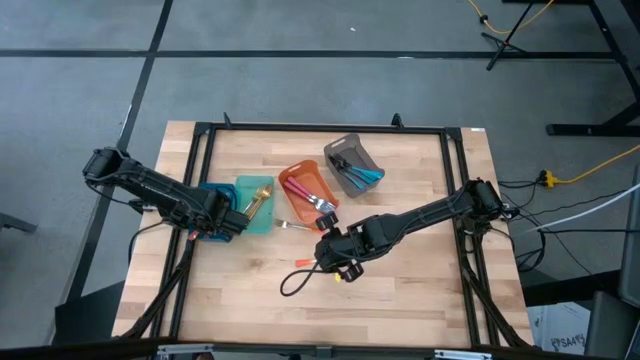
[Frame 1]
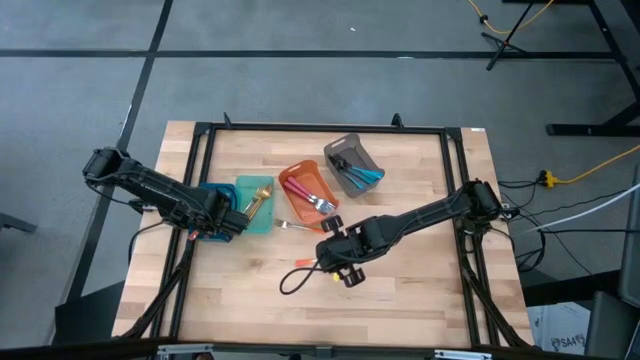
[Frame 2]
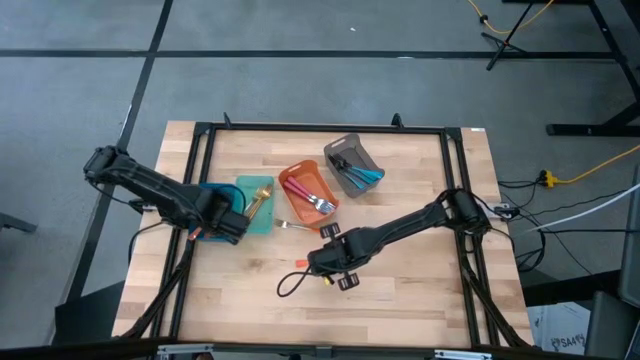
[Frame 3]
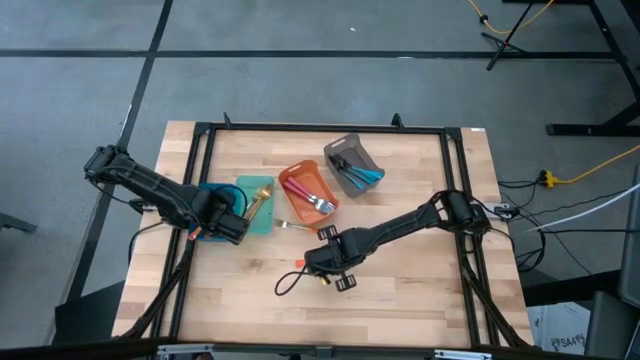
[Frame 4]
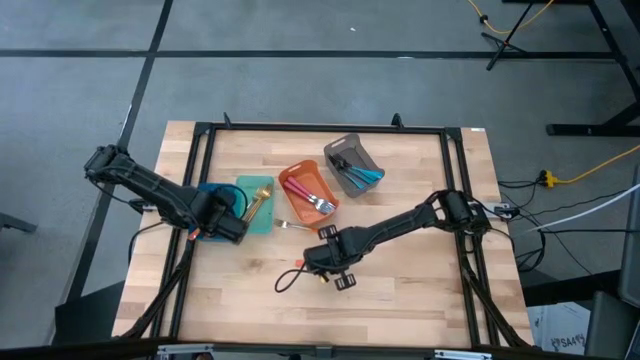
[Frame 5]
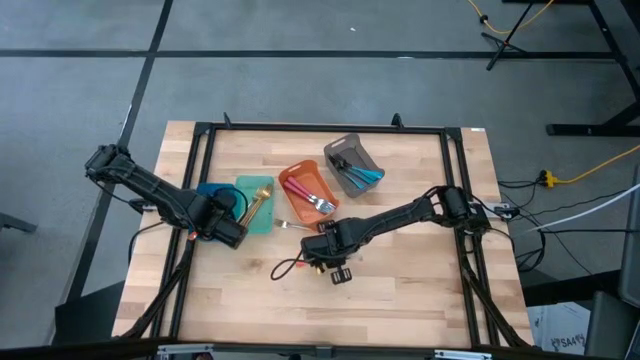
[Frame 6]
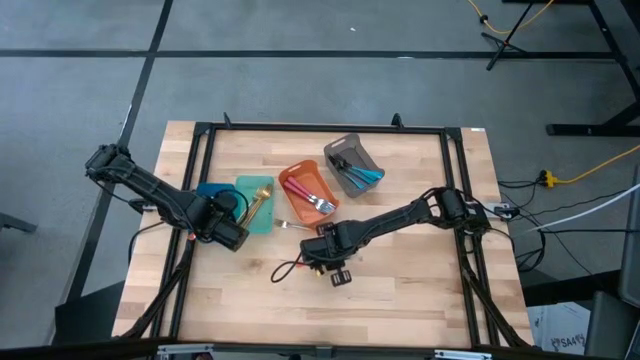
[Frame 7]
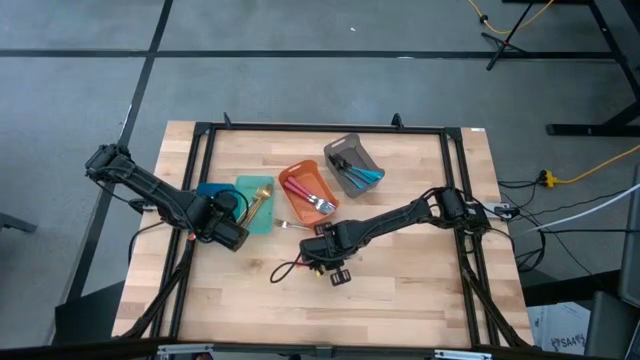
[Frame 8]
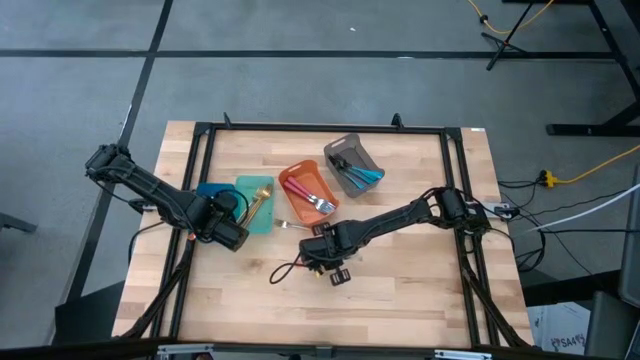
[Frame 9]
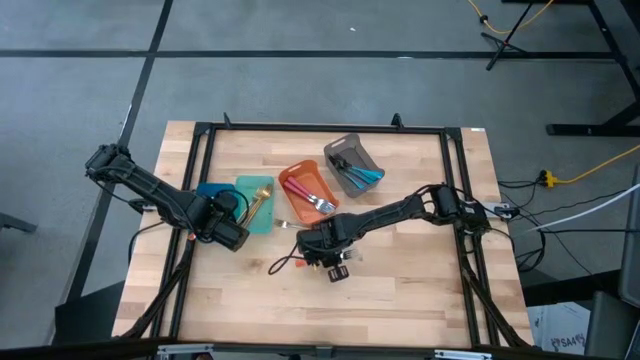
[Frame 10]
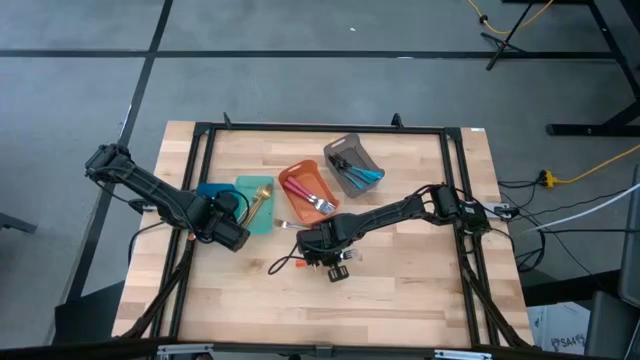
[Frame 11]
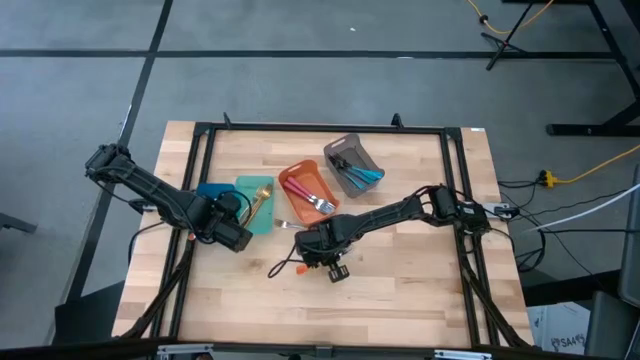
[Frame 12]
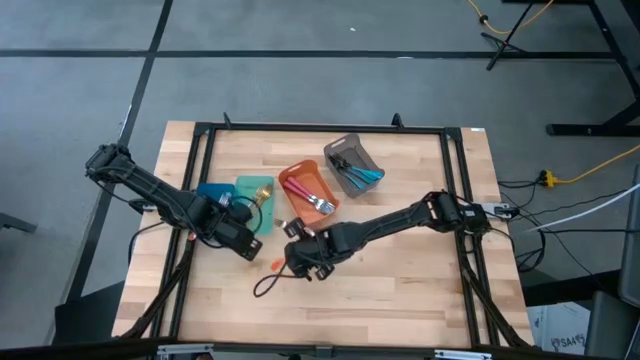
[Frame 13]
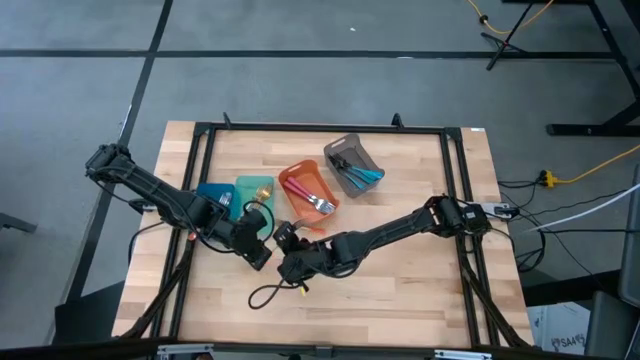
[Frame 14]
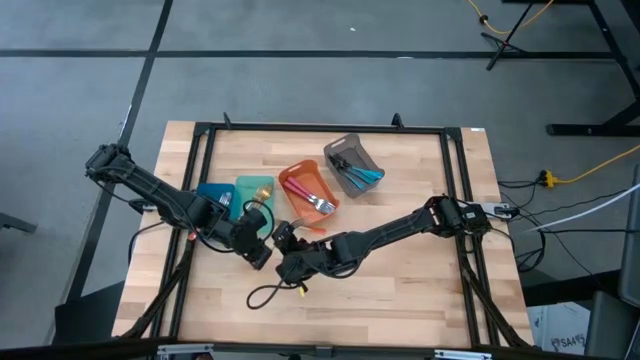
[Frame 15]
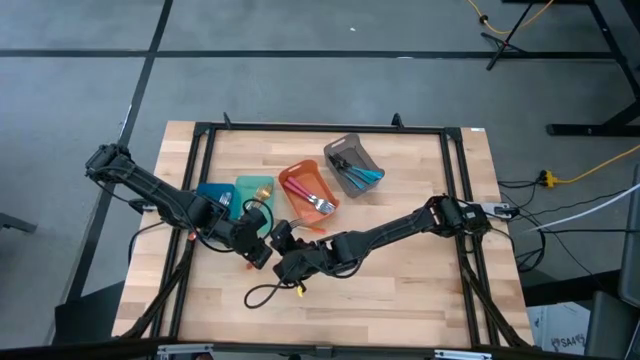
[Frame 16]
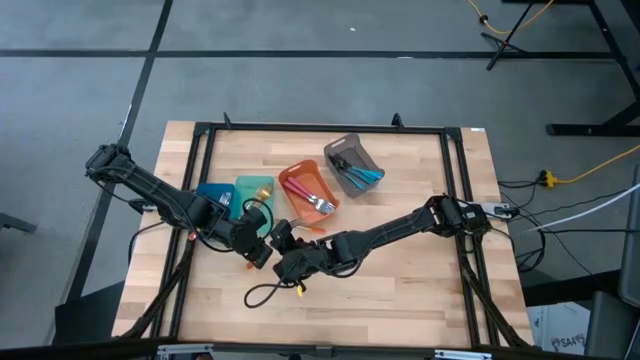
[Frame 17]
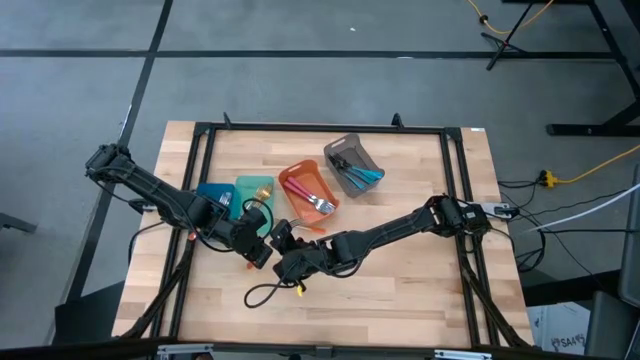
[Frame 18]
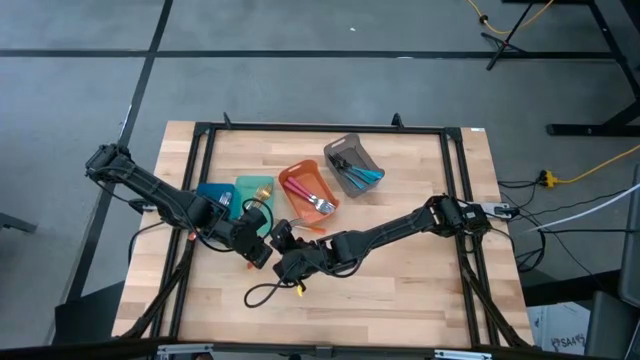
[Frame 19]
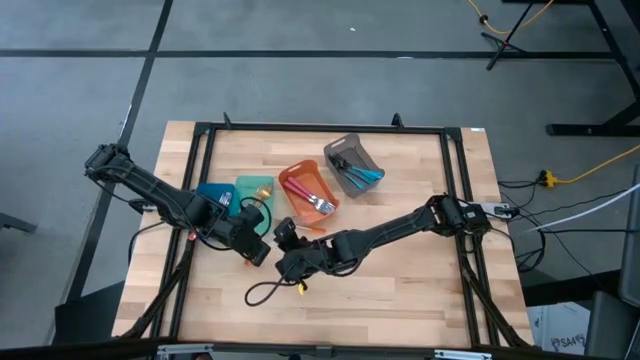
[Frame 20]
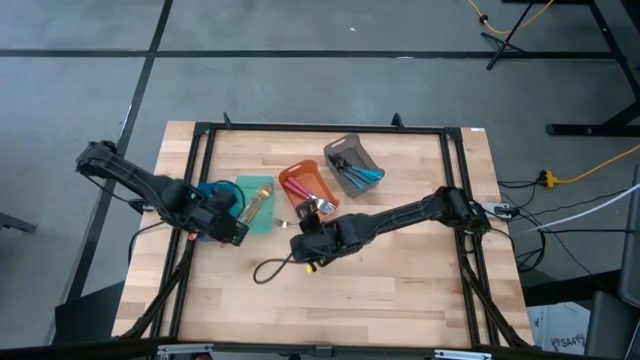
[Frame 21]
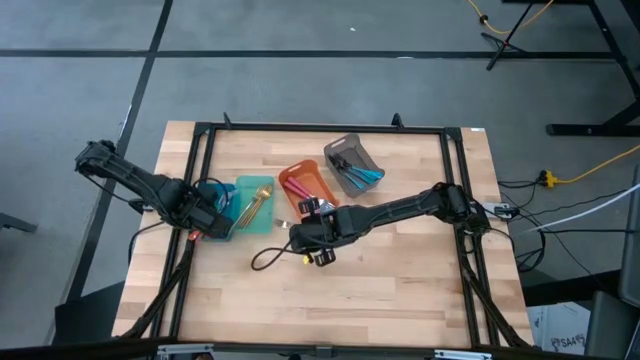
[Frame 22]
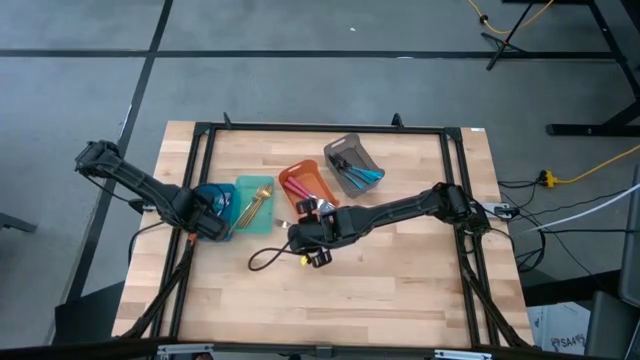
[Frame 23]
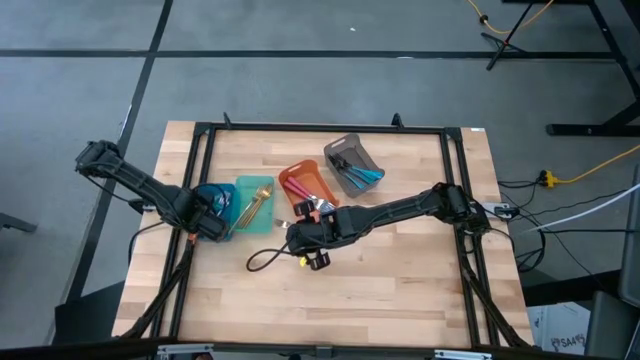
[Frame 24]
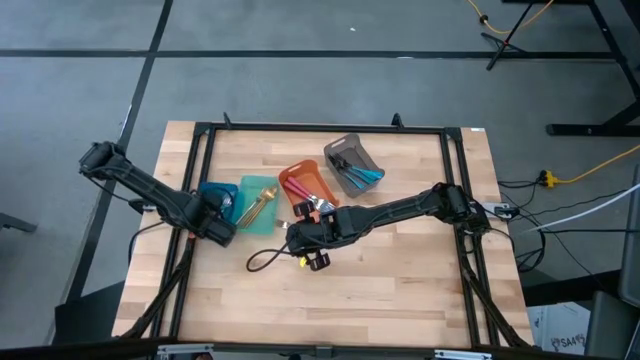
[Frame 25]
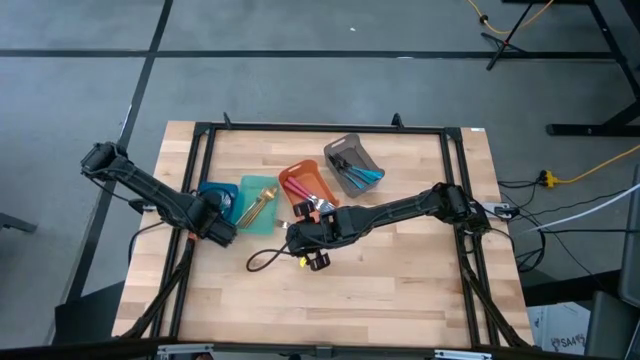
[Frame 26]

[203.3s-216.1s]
Task: Sort silverware by color (type)
Put the orange fork into the blue bin

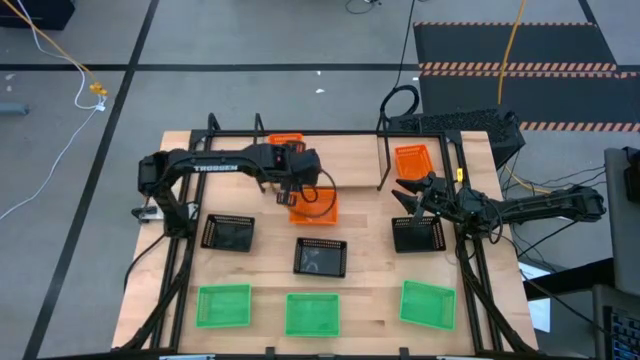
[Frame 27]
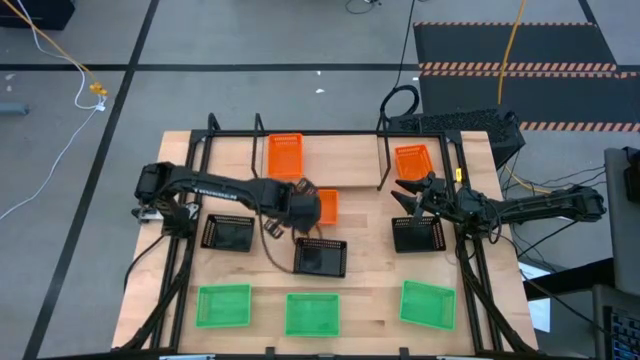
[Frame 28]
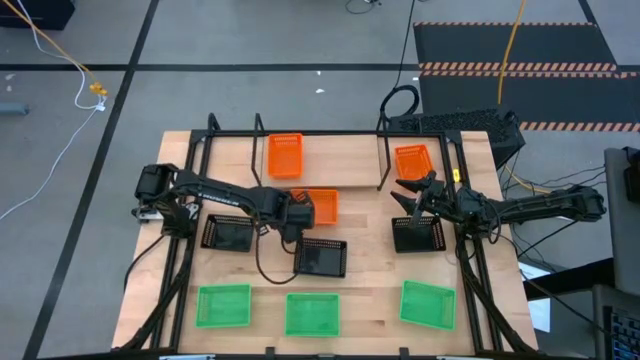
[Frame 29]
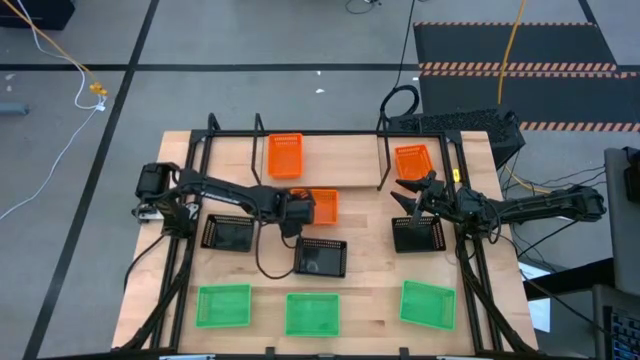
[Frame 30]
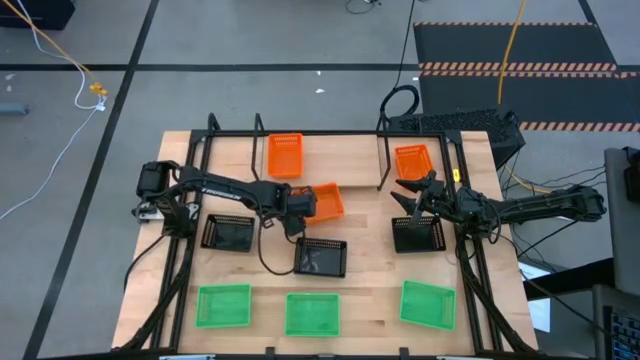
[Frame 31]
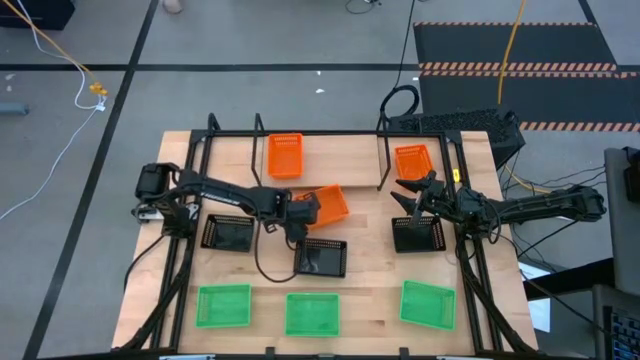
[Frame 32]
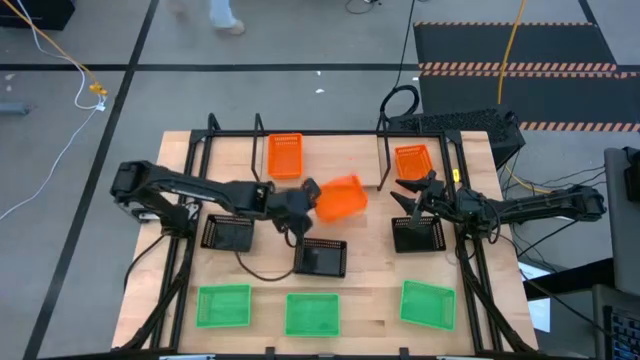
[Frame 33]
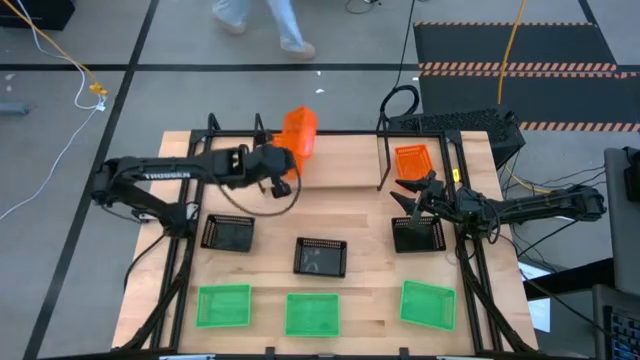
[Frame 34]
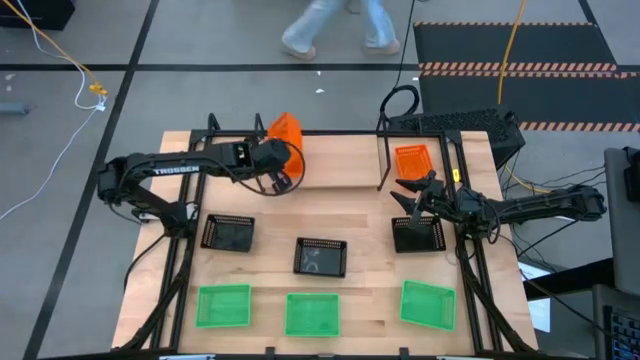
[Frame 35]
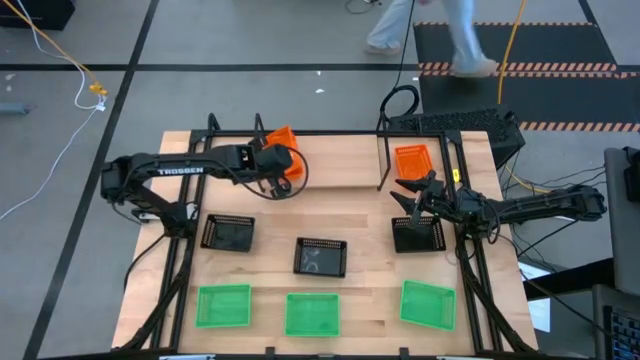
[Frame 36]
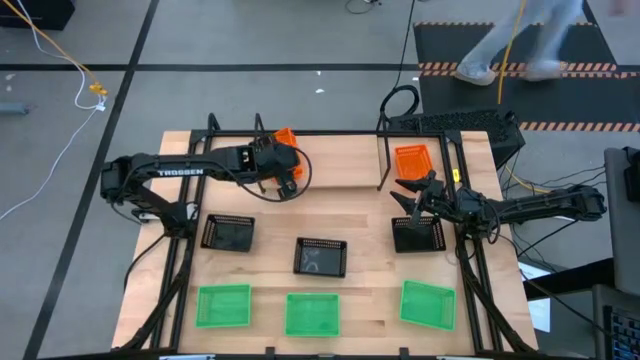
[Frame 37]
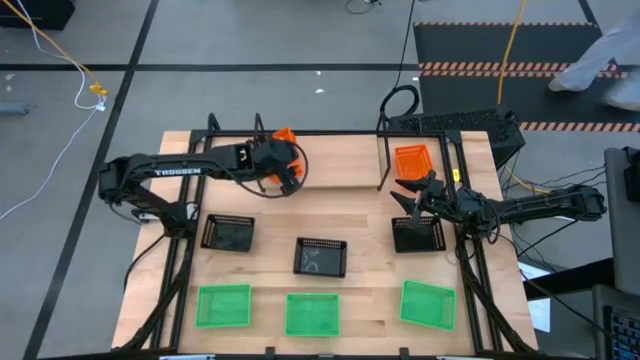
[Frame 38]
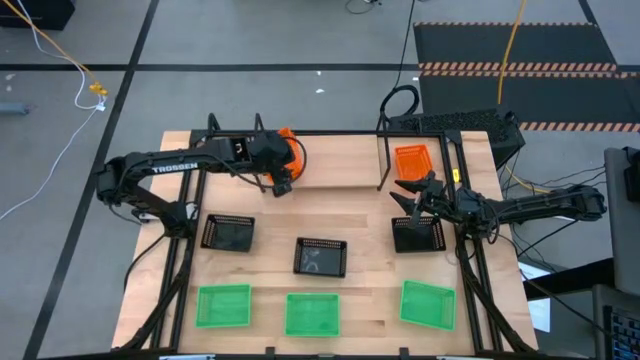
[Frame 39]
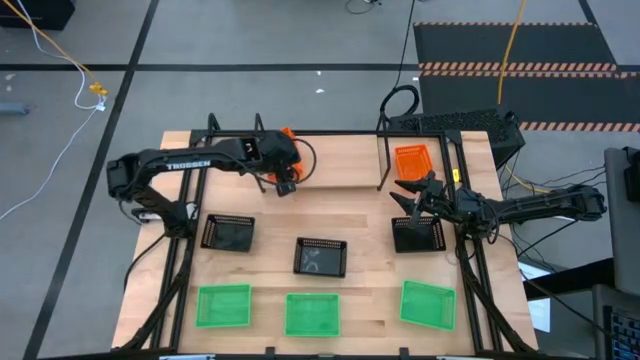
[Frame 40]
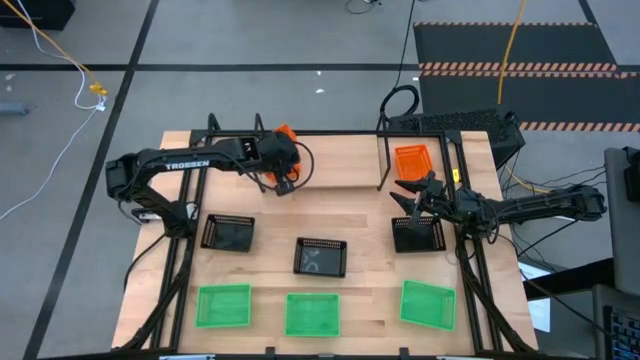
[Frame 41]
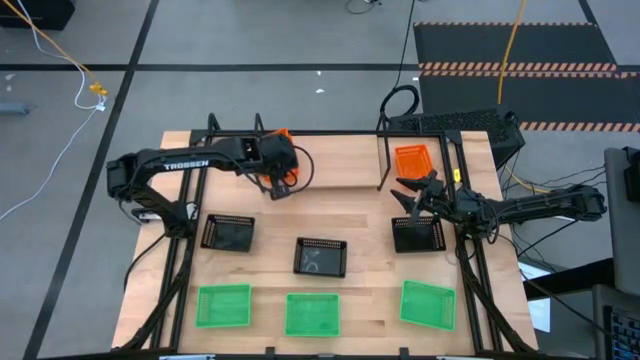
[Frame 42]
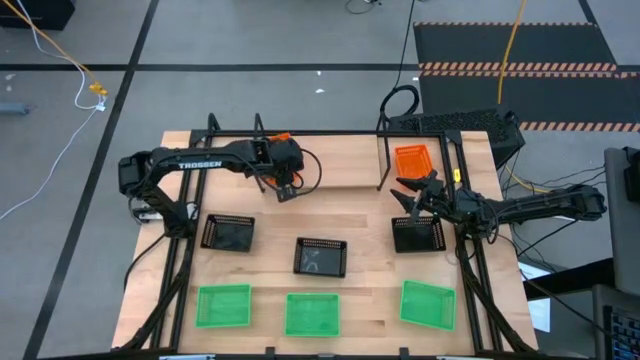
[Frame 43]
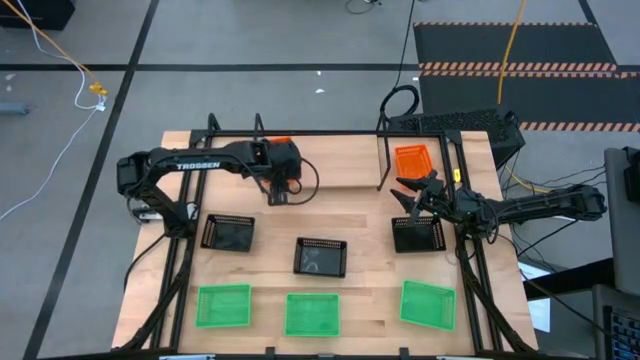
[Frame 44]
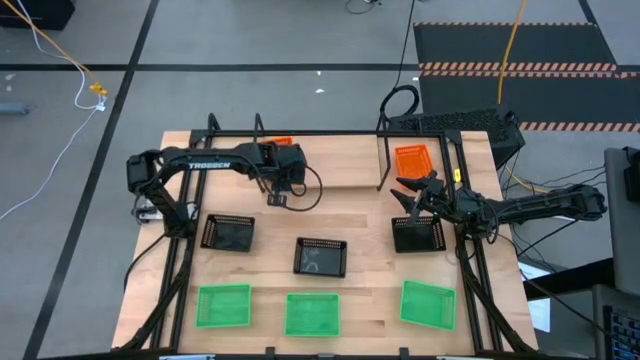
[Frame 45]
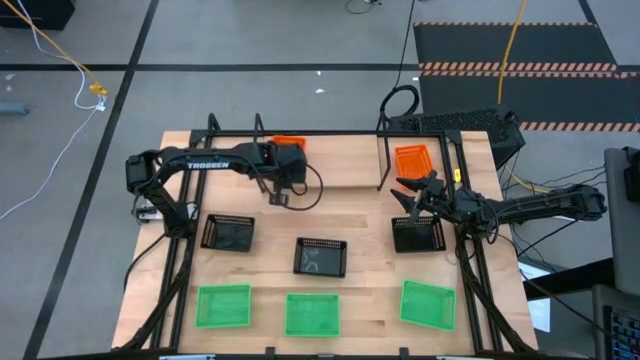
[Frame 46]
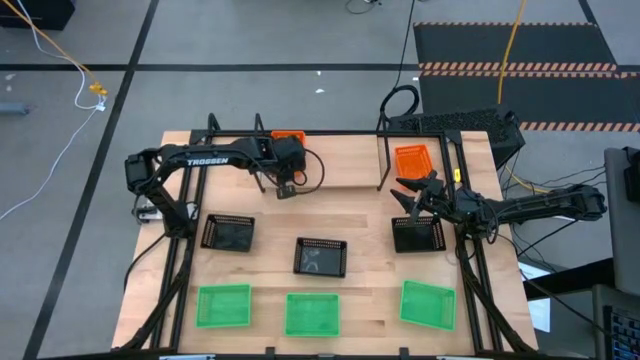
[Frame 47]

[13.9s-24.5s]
Task: Stack baskets on shelf by color
Stack the left orange basket on top of the orange basket on the shelf
